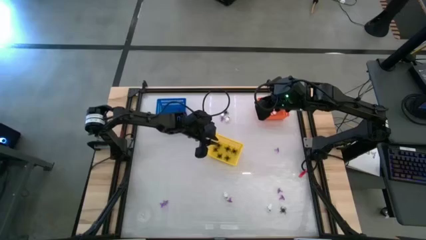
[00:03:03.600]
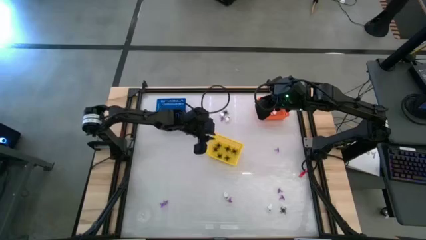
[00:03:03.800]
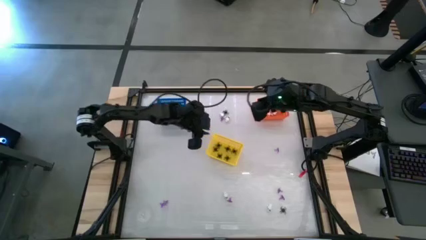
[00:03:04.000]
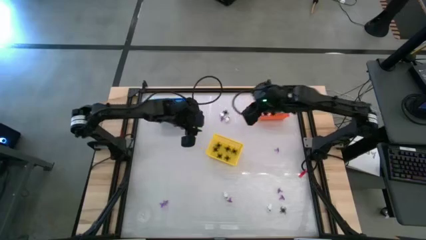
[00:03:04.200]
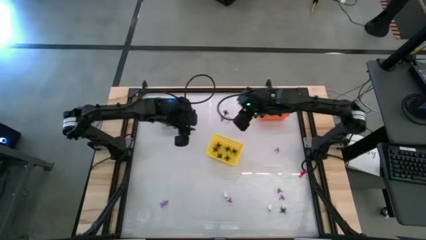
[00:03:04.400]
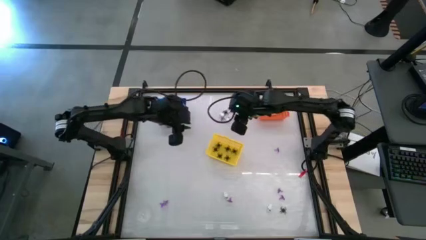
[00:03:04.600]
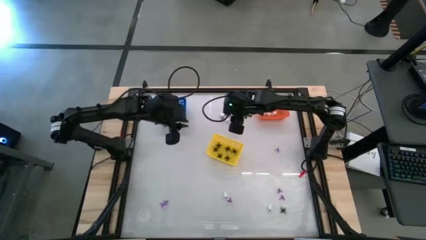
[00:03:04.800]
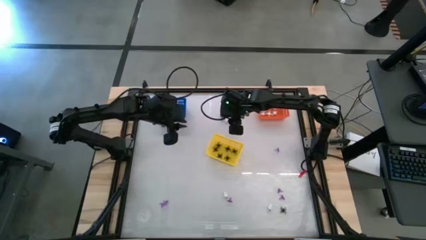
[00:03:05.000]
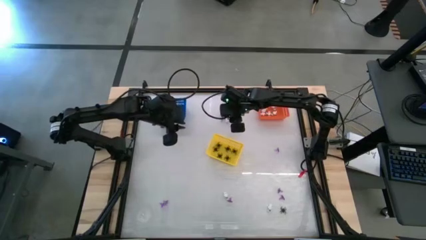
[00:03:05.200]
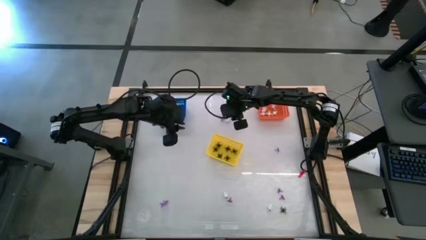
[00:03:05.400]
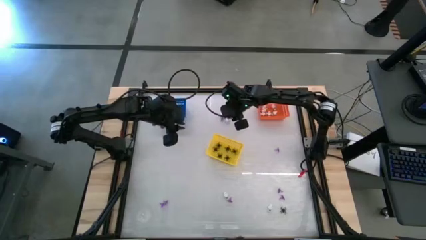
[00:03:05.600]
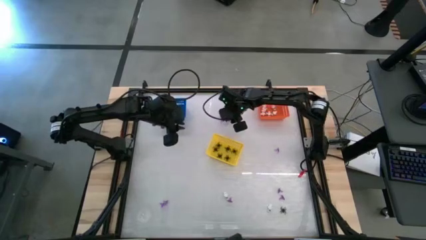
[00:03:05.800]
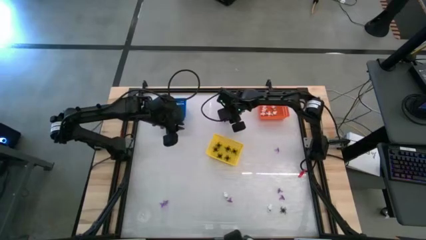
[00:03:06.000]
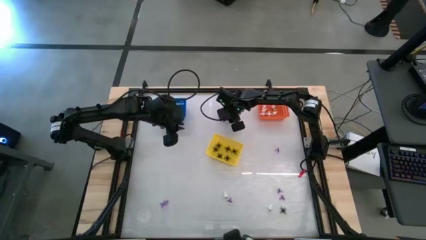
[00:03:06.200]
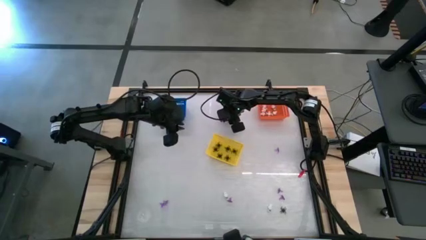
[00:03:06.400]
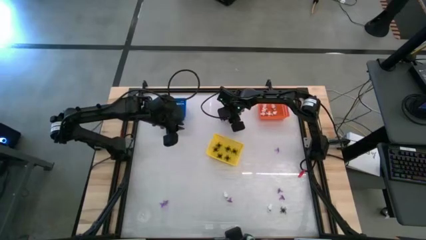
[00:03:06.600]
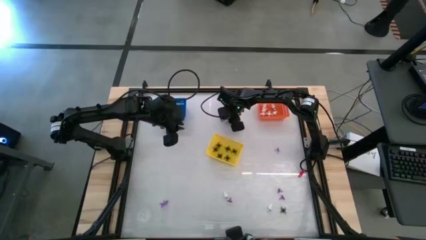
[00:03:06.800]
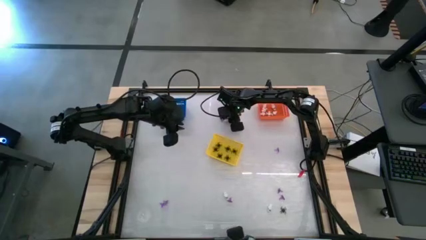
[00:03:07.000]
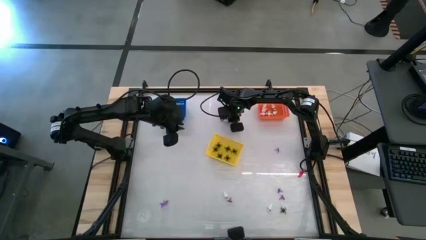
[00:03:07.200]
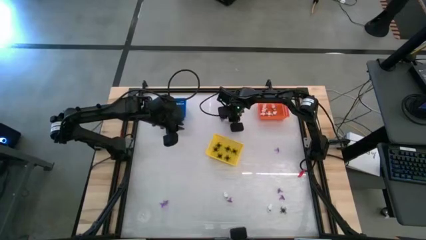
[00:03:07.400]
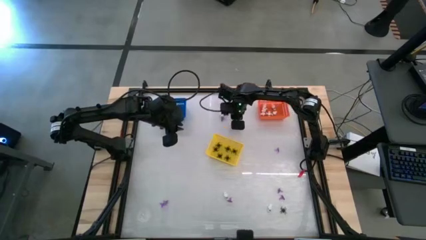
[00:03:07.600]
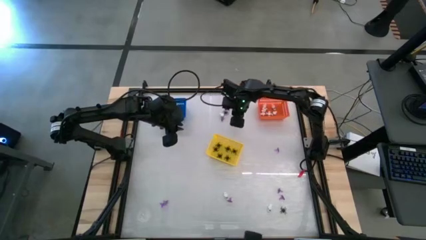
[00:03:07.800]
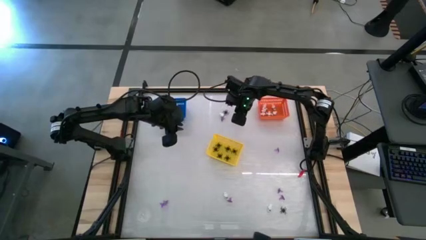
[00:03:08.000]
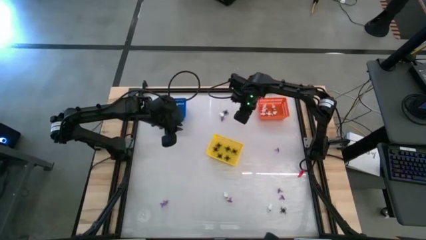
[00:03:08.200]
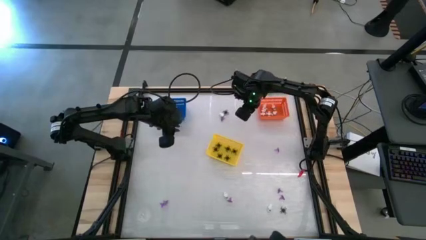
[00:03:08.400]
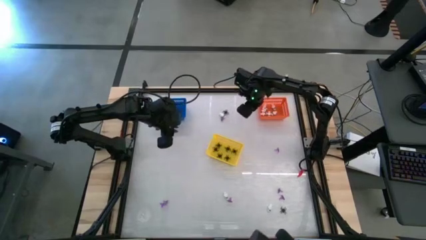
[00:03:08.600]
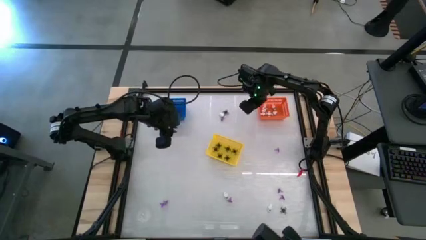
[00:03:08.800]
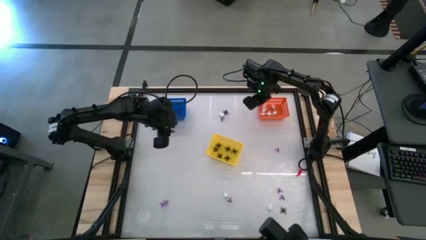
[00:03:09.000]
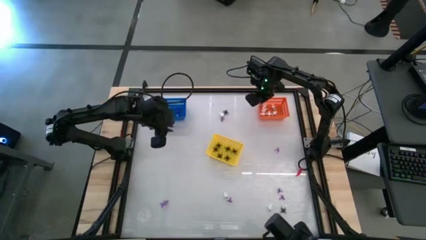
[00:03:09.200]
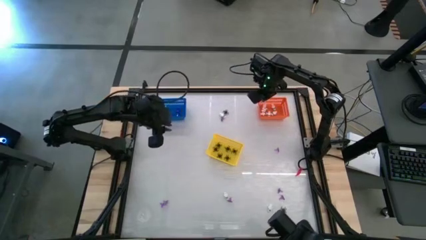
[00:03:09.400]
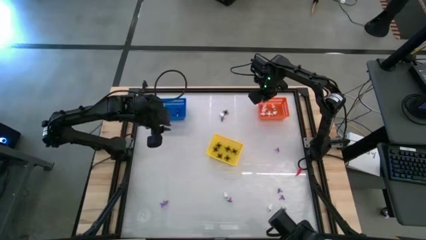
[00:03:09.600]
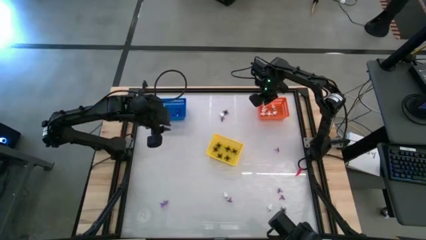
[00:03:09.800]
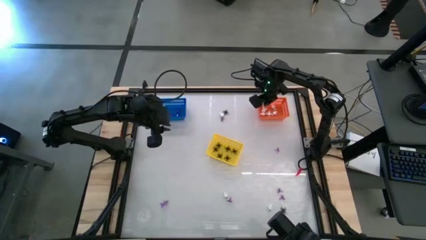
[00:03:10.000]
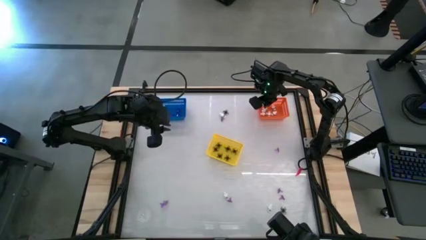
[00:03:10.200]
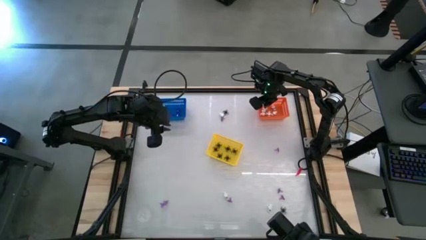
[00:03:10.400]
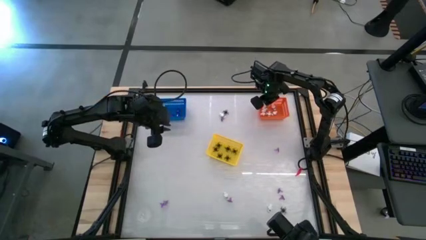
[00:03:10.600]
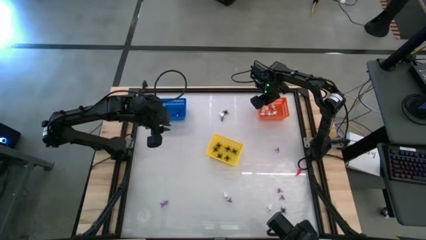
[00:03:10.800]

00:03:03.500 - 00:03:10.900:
Task: Sort Halloween decoration
Put the white skeleton toy into the orange bin

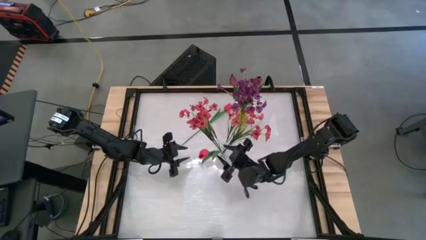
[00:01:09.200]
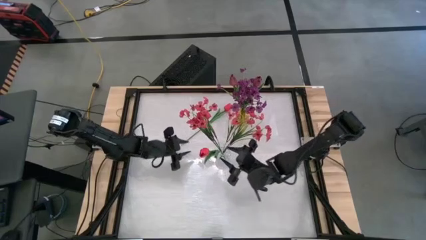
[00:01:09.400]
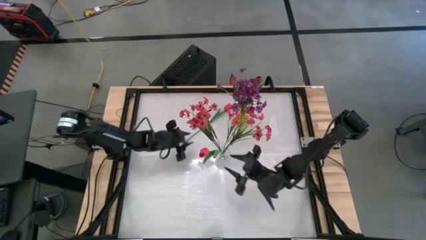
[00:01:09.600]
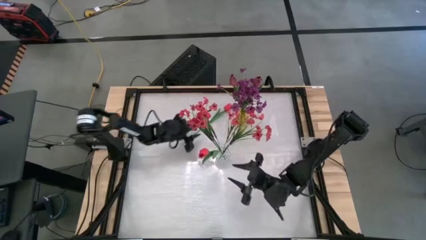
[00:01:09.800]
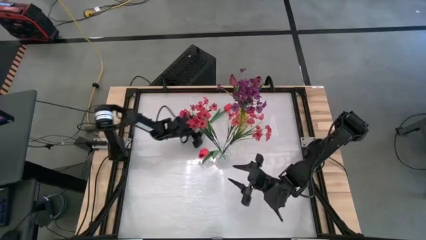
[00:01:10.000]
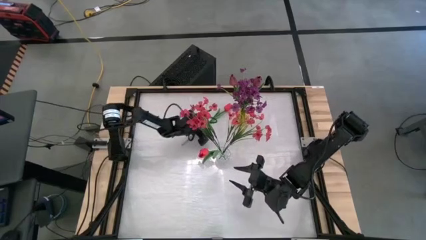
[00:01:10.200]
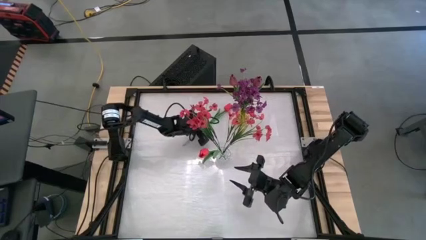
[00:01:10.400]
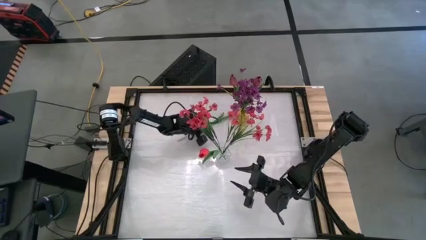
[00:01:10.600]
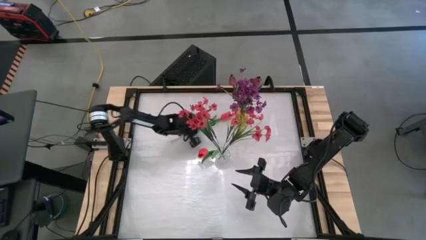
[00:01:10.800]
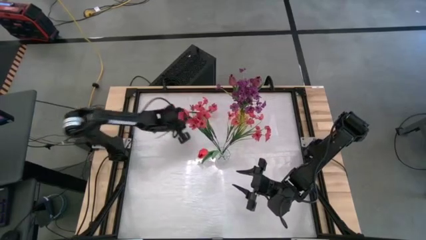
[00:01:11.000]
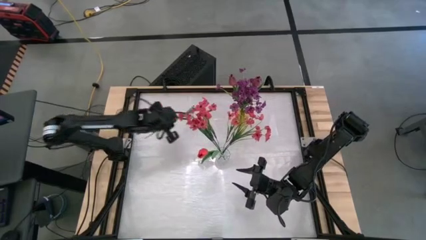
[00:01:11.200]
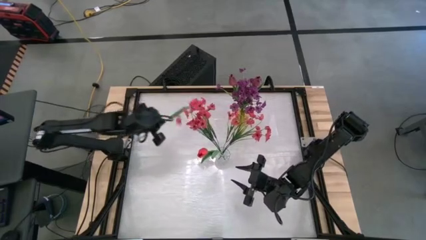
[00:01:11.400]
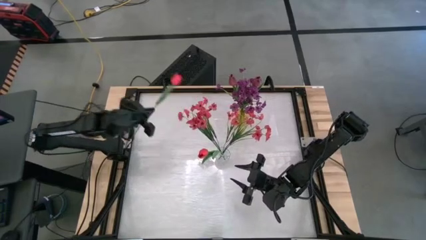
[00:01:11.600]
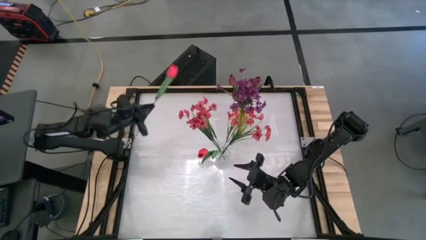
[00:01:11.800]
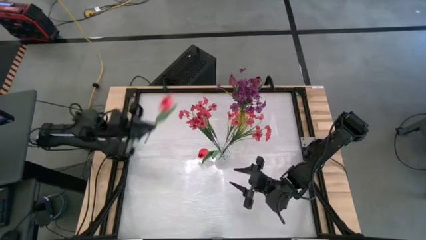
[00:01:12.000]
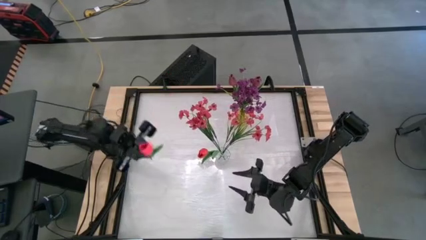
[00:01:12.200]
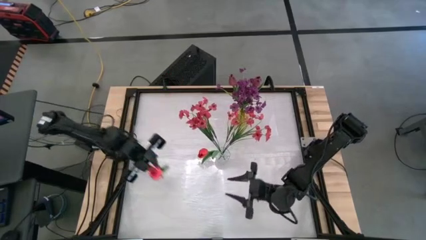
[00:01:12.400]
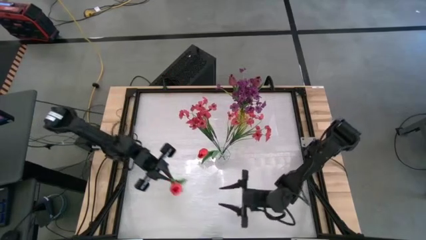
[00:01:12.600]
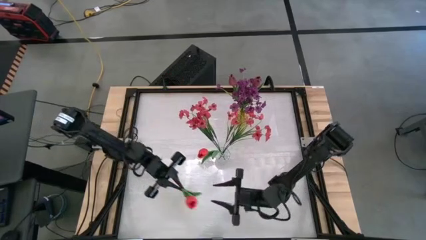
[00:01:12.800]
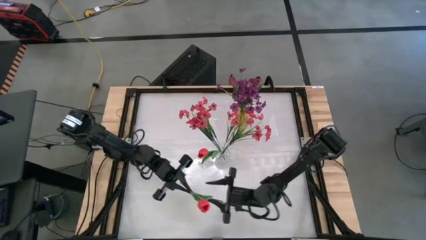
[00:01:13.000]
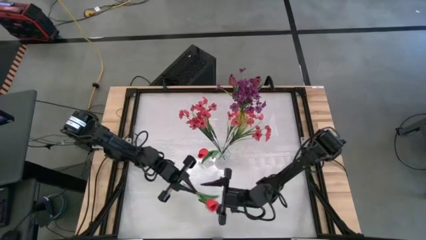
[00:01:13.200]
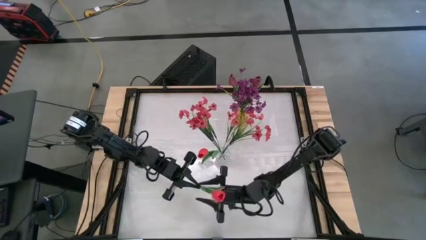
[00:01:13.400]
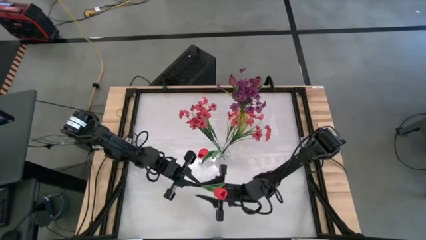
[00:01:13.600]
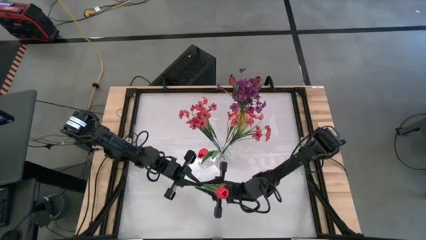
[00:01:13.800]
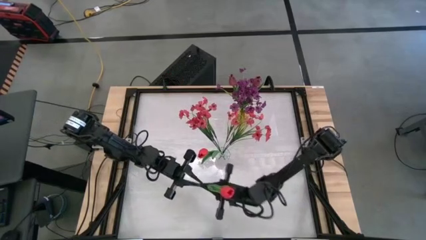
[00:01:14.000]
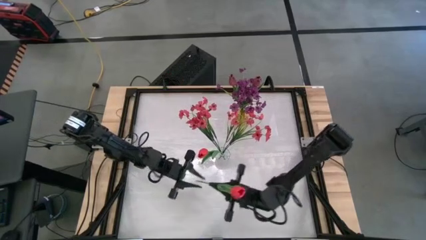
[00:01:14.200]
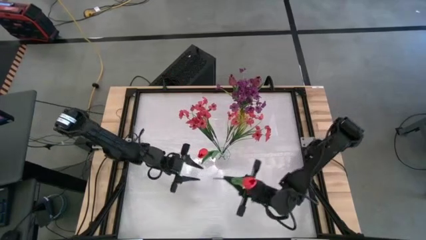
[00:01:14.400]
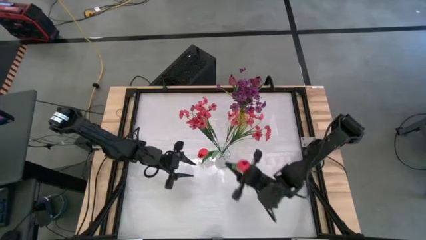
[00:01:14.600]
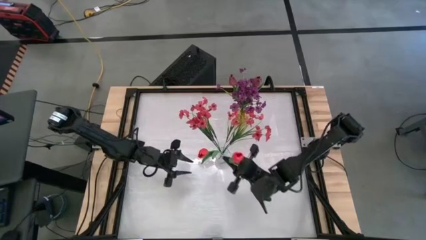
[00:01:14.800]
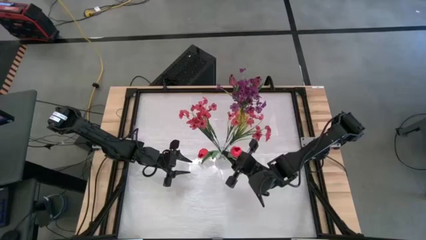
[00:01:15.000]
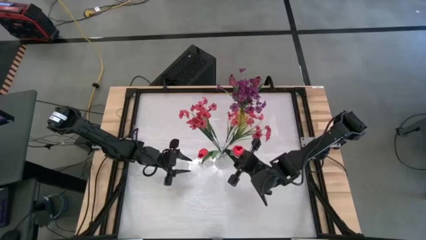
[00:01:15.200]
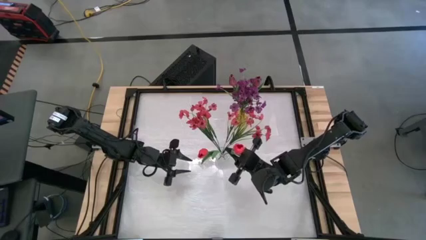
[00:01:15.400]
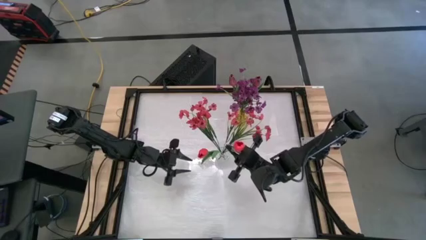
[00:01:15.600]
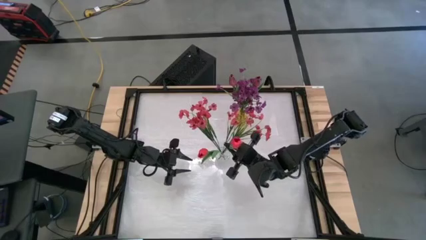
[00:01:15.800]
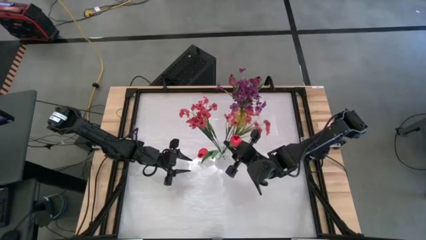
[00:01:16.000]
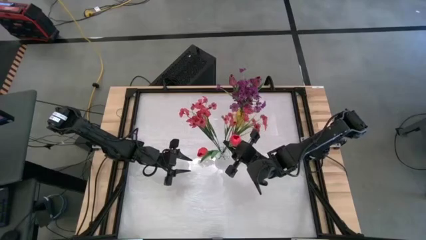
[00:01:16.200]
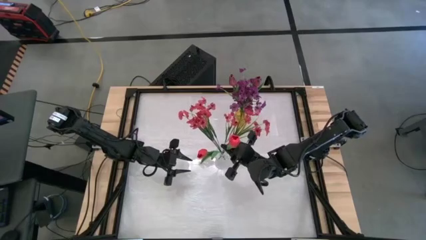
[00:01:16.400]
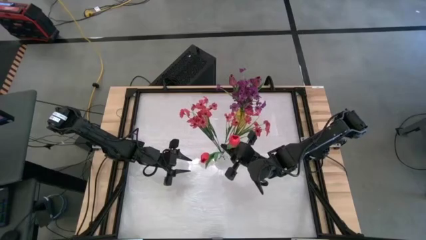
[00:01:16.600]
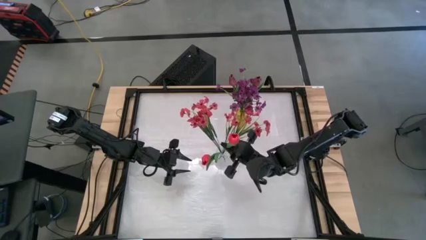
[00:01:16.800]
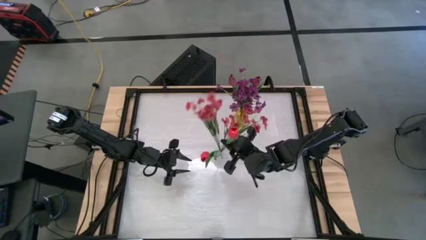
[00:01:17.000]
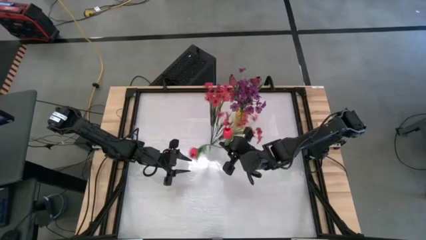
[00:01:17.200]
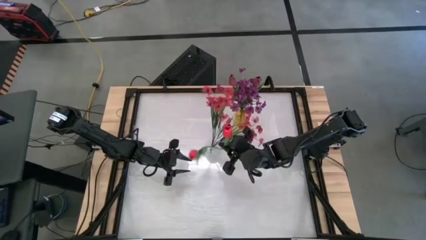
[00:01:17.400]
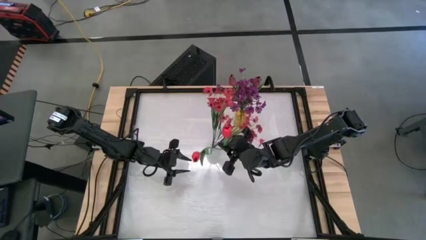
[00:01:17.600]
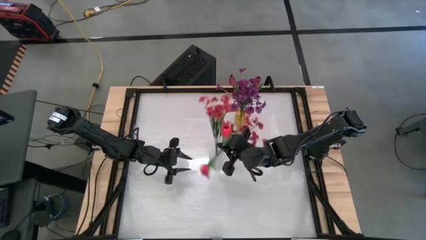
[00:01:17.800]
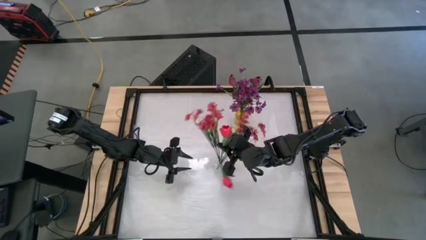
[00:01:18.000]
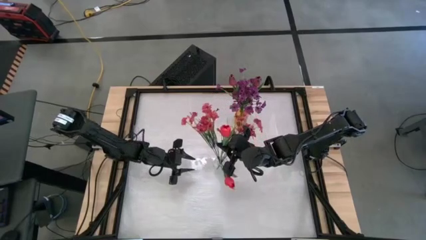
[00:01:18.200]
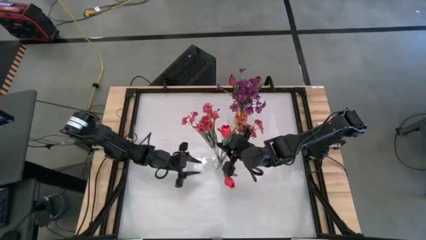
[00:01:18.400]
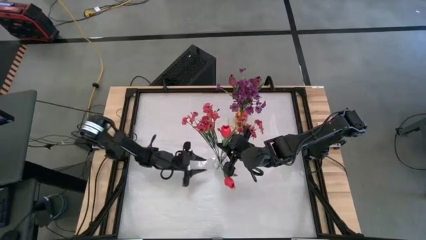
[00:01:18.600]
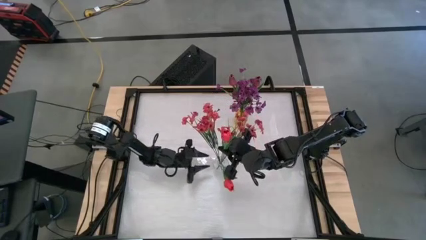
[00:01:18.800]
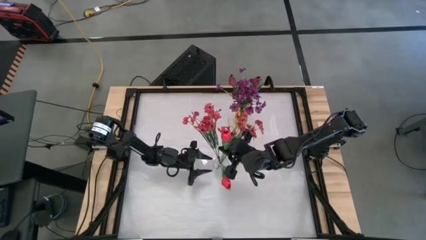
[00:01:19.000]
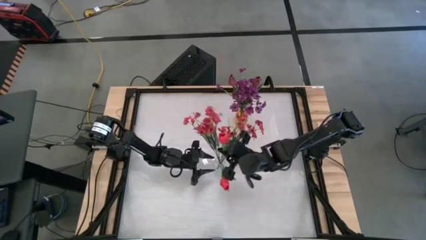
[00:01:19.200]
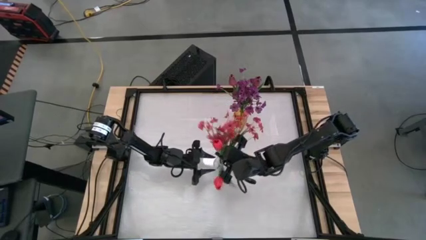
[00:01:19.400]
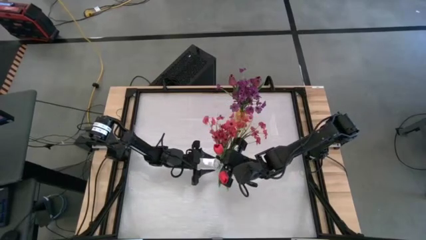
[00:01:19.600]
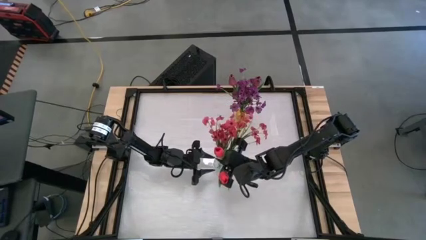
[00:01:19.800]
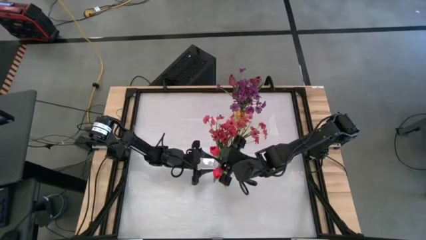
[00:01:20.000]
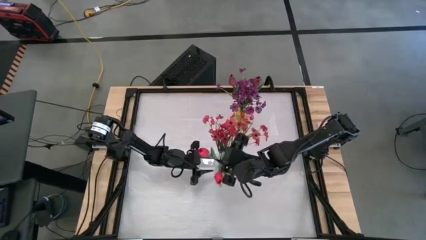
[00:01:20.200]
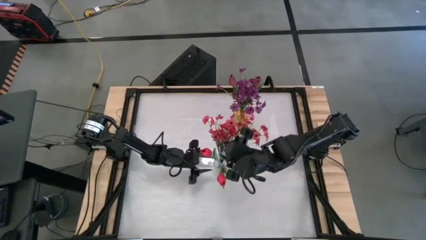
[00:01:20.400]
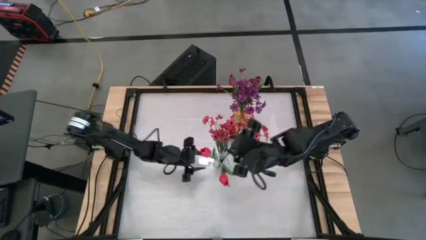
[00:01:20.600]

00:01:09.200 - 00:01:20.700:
Task: Sort flowers into vase by color
Put the pink flower into the transparent vase
